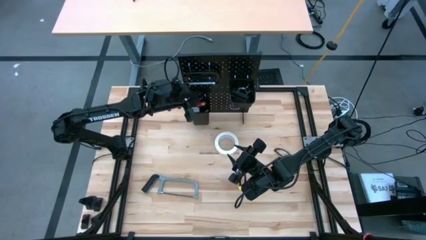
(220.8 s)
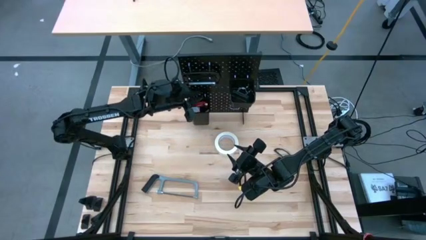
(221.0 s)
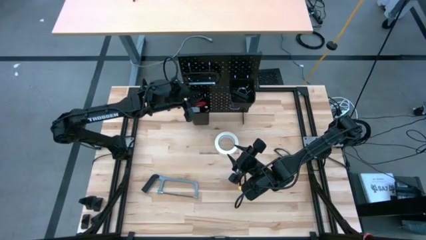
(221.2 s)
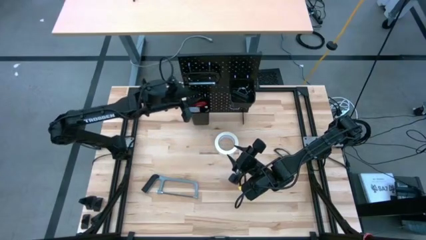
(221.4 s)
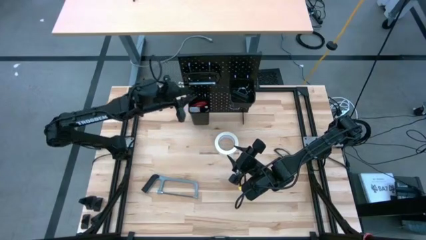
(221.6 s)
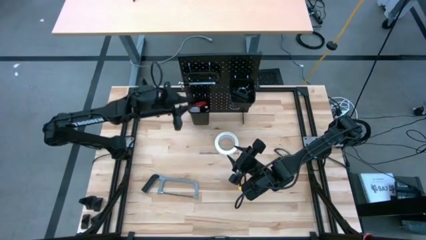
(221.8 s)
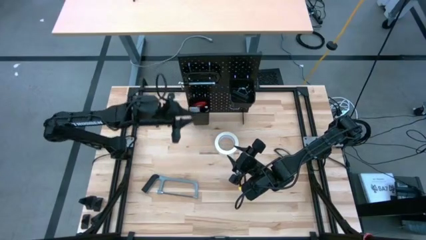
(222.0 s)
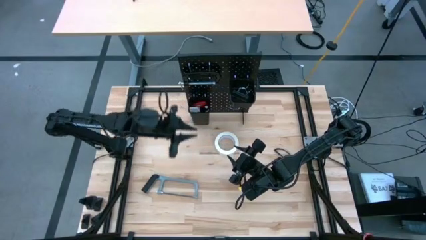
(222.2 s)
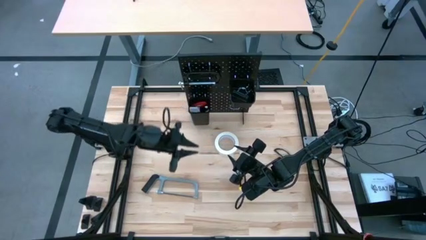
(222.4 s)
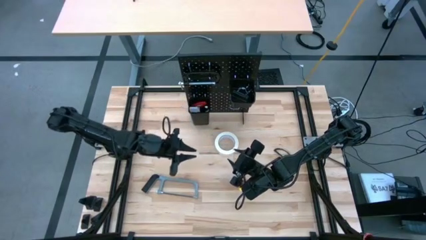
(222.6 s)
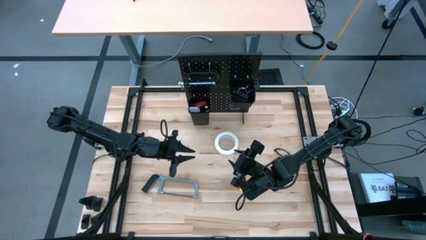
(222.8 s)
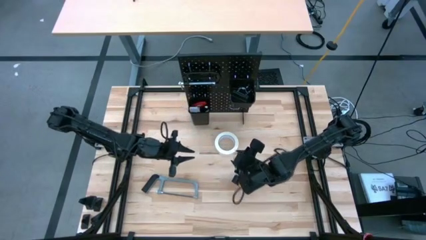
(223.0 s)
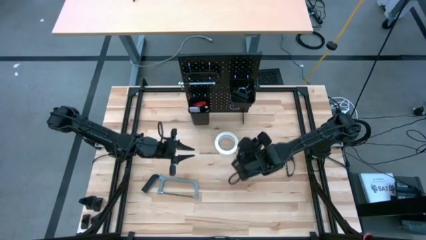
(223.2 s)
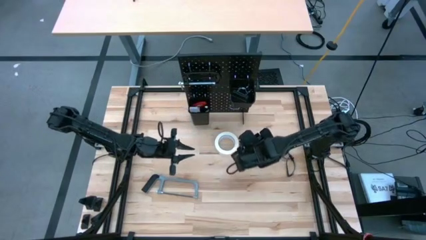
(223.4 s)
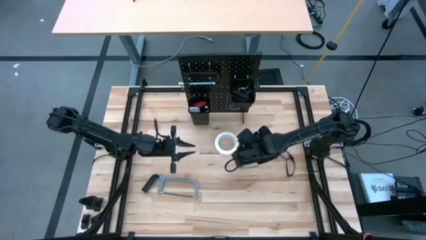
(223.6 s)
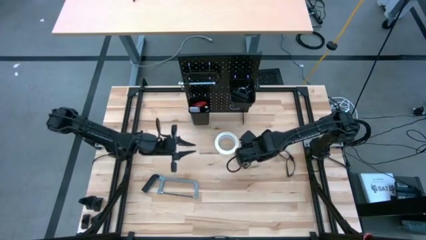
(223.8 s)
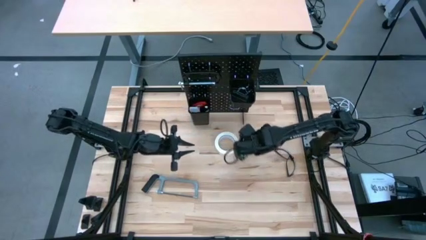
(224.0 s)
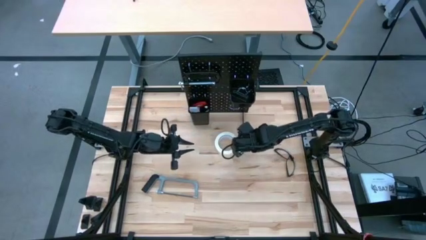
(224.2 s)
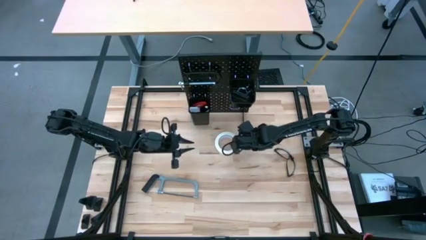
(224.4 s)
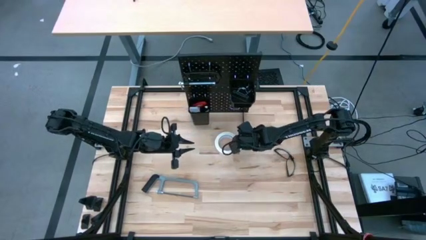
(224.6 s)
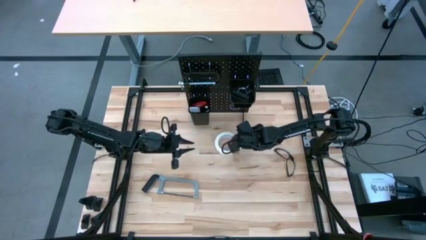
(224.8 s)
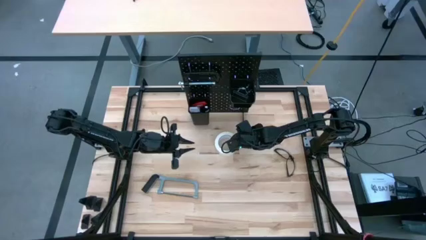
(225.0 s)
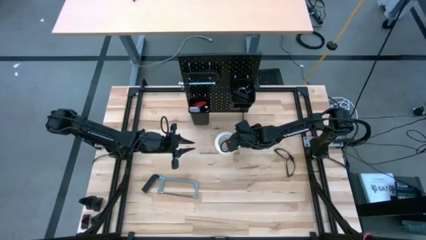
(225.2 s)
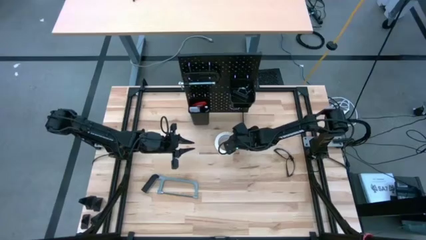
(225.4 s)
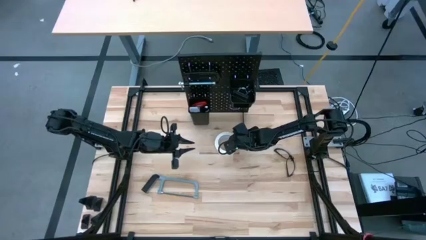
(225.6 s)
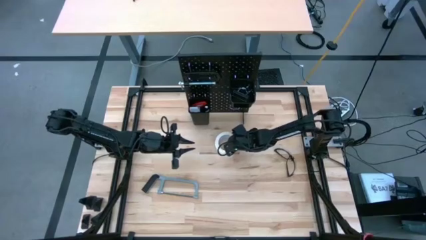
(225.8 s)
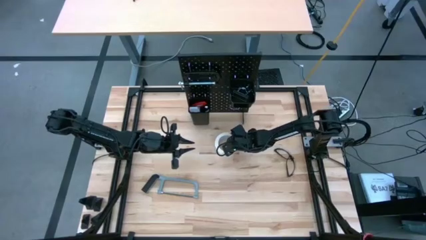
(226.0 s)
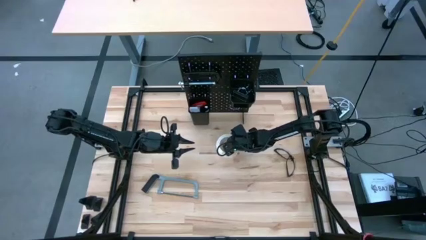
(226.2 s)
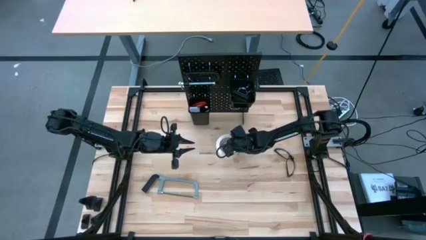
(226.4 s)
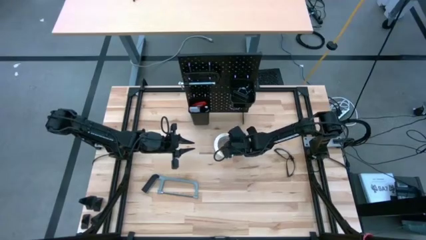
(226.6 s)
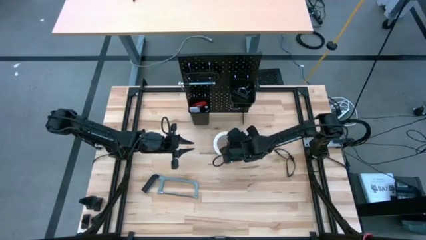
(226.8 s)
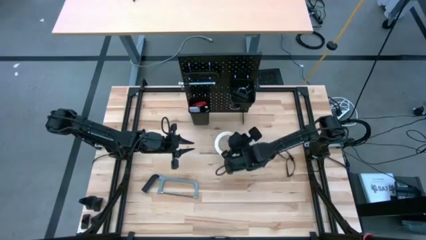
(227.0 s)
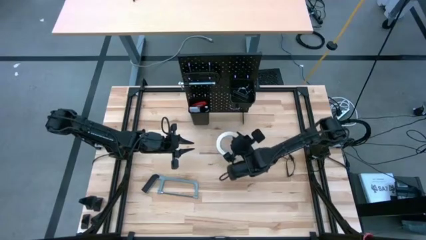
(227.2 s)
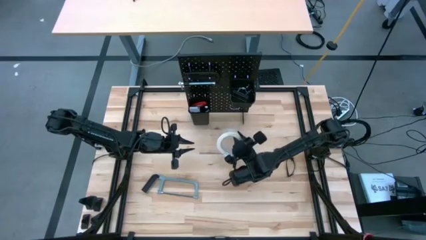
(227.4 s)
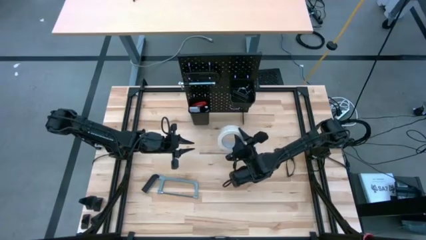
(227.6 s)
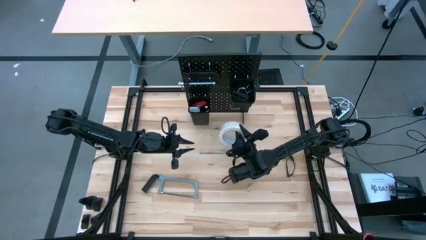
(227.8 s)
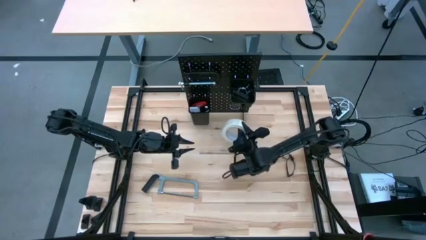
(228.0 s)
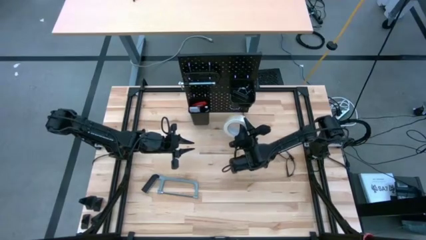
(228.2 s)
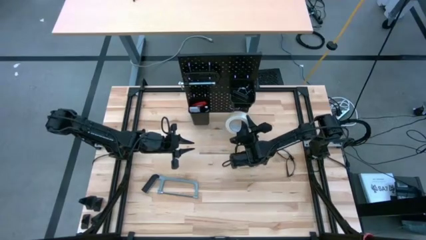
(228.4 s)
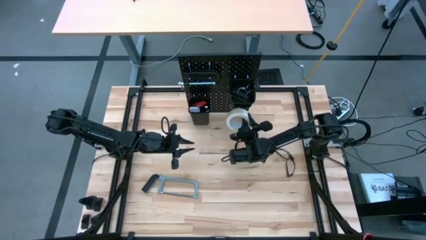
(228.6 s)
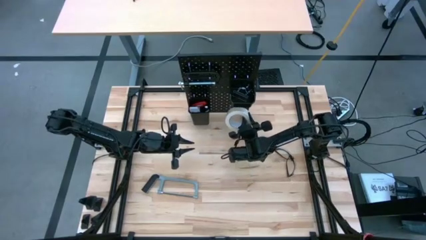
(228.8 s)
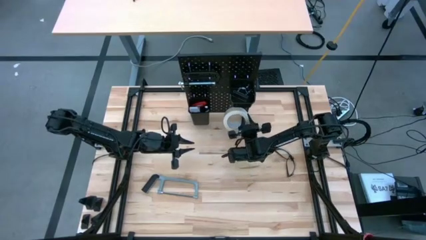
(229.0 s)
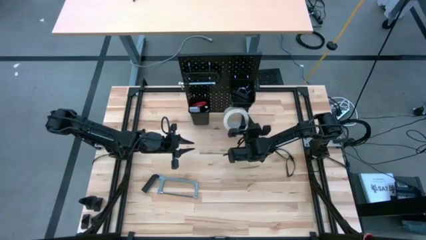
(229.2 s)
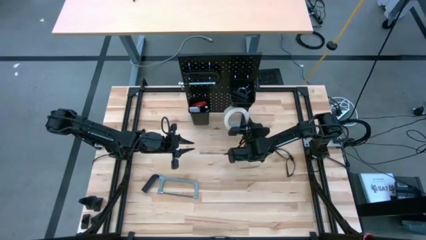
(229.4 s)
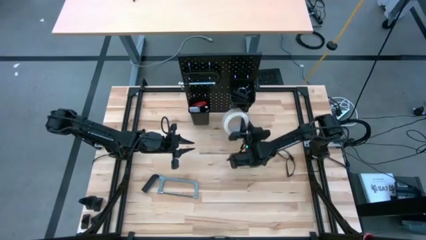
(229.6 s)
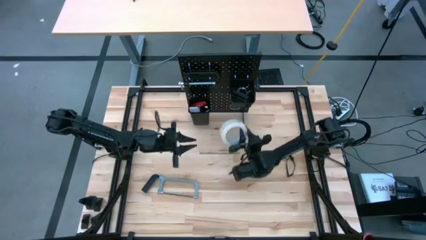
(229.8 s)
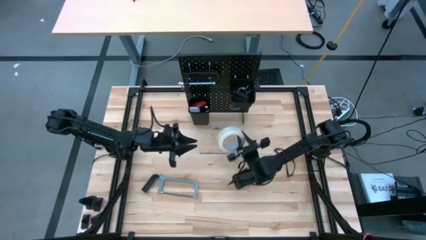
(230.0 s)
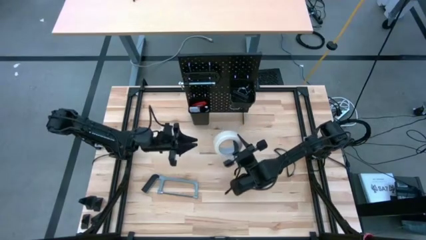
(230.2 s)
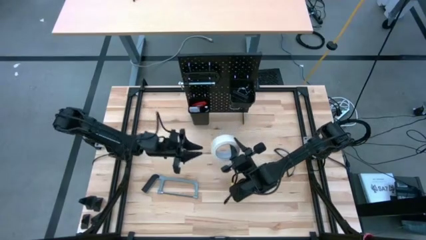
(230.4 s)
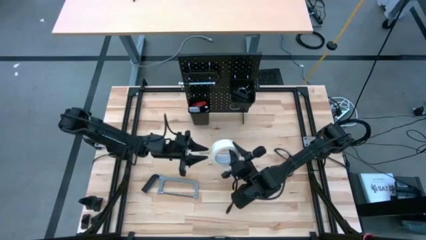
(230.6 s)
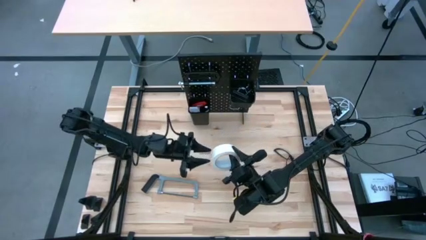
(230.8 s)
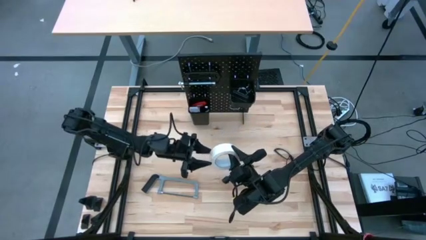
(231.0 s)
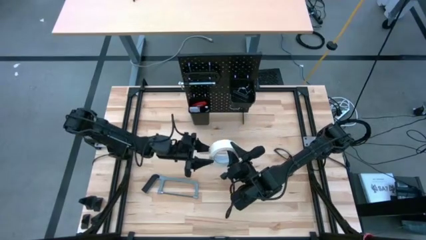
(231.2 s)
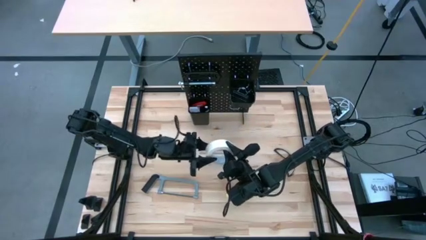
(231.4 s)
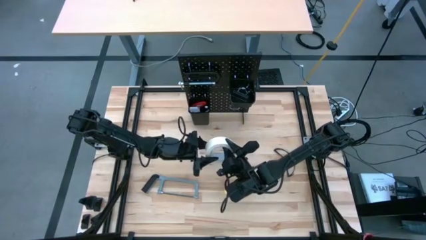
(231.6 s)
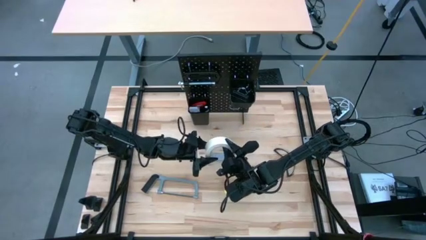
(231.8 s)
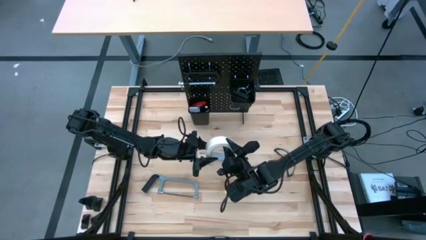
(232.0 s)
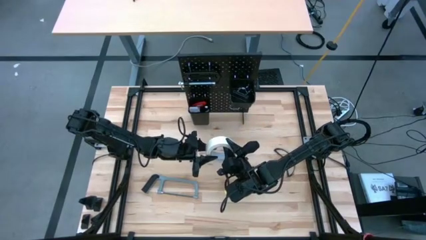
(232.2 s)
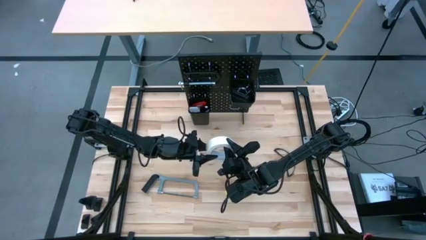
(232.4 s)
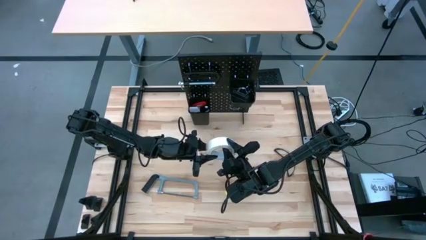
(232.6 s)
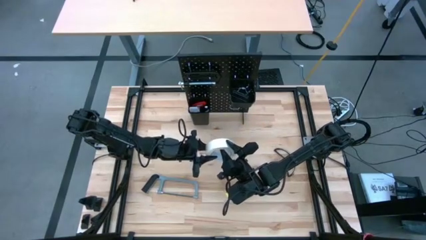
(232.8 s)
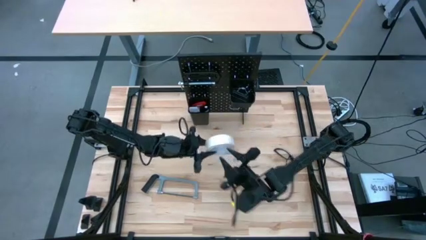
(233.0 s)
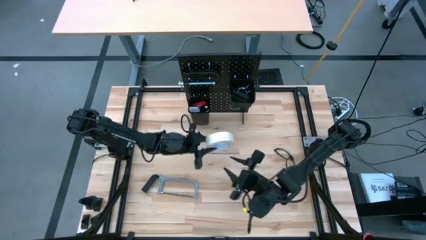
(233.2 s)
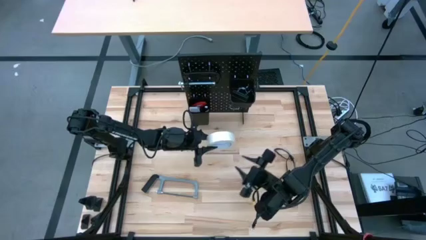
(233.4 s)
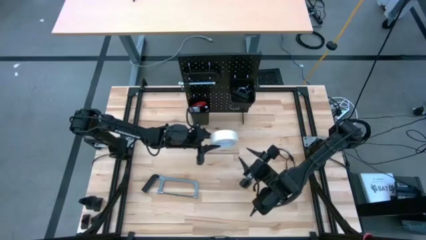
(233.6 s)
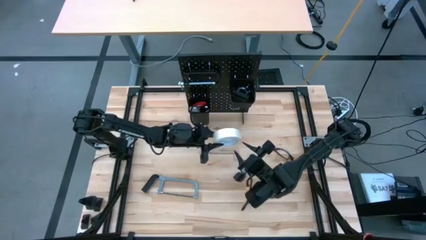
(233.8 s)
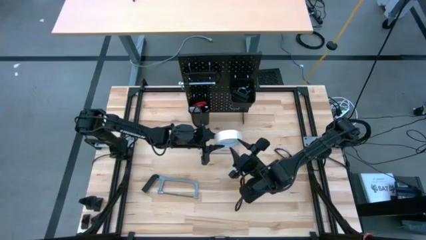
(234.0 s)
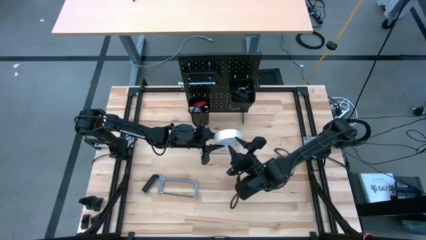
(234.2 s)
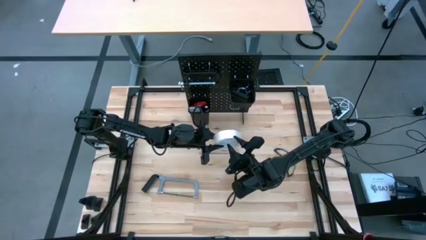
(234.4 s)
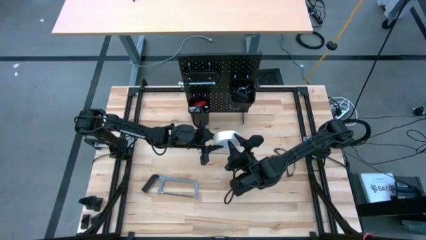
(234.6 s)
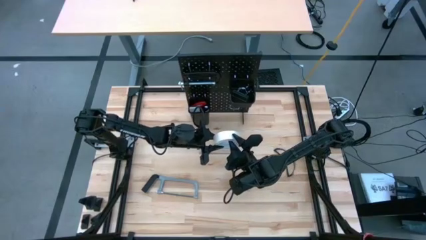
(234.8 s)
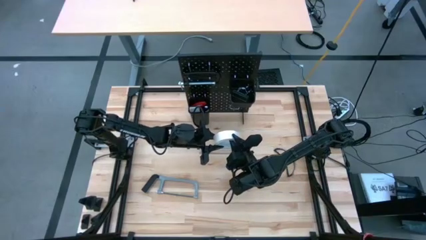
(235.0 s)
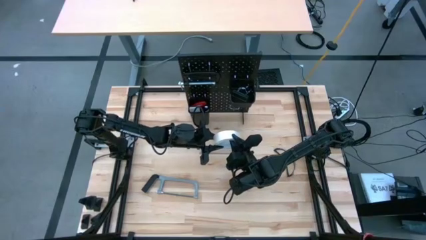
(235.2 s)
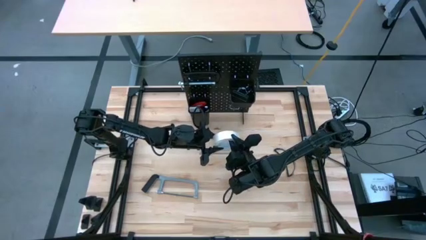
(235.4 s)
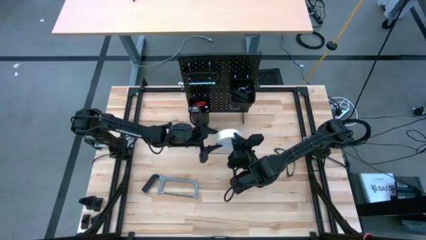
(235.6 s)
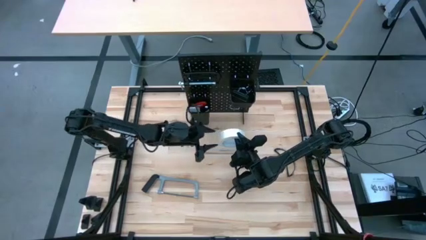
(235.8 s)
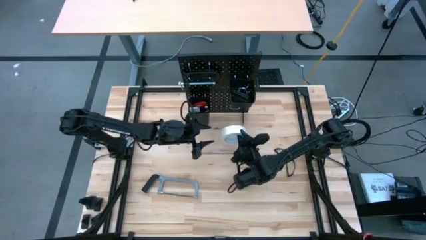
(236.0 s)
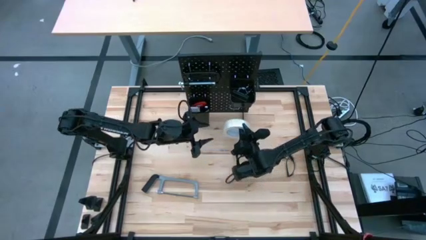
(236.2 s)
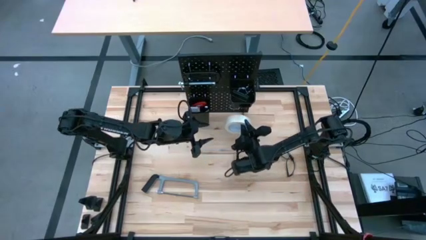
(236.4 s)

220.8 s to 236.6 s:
Task: Hang tools onto peg board
Hang the white tape on the black peg board

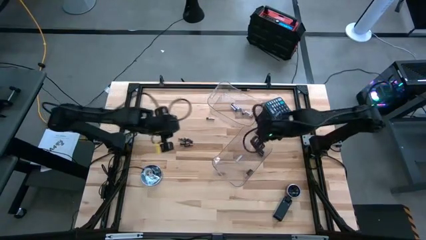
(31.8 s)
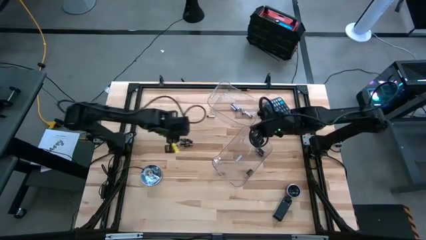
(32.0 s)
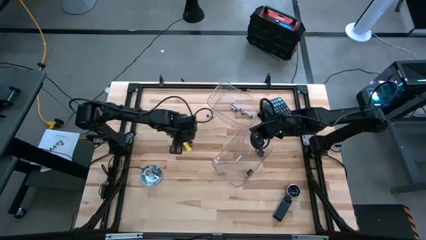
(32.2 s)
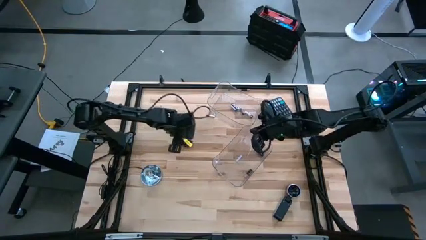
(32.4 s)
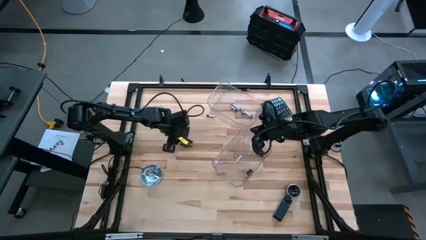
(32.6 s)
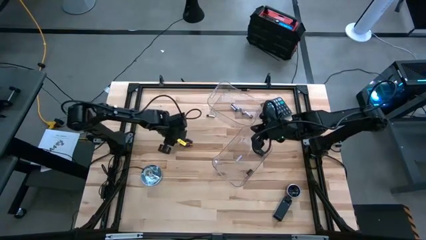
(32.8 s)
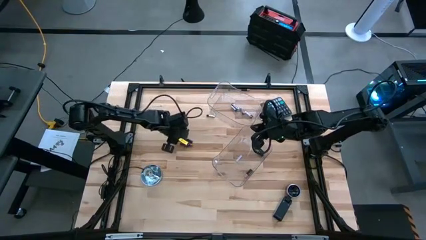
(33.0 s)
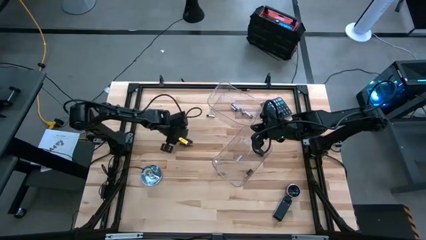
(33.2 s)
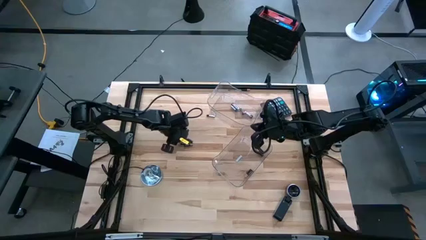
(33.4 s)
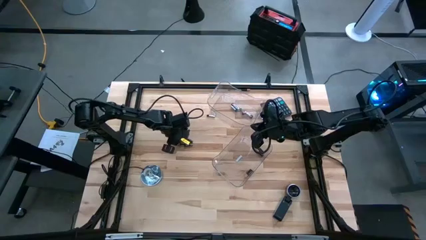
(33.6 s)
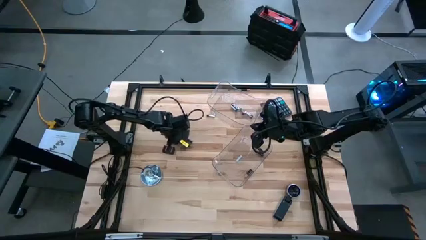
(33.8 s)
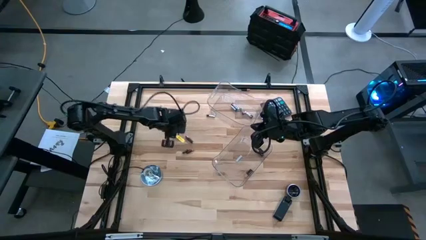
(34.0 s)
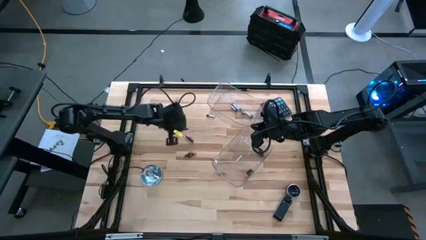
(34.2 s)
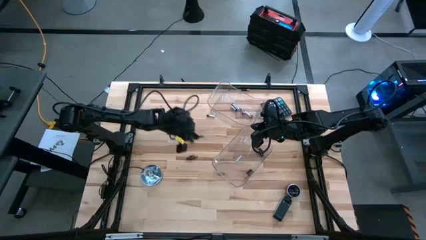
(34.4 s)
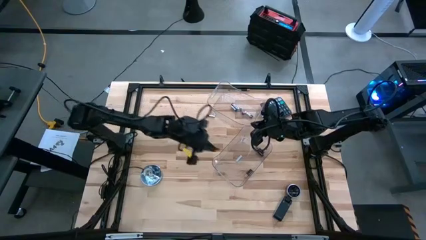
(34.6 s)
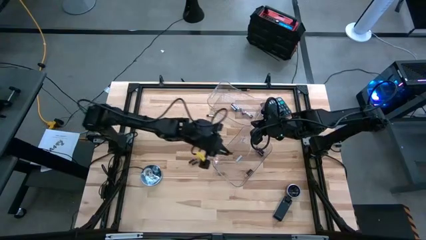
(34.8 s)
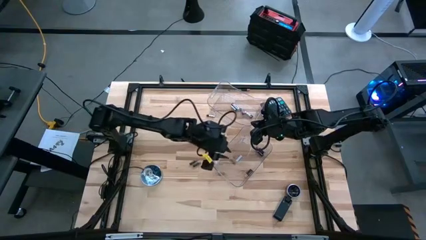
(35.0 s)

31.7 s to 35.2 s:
Task: Sort batteries
Put the black battery into the bottom transparent bin
